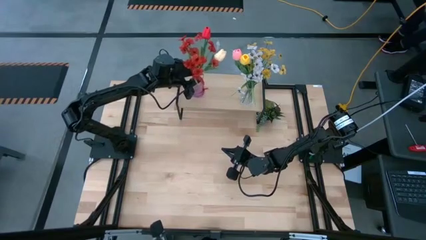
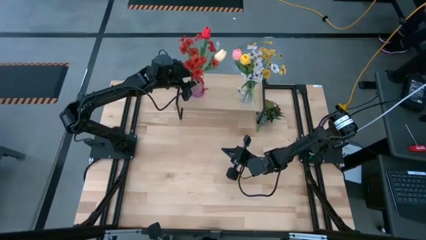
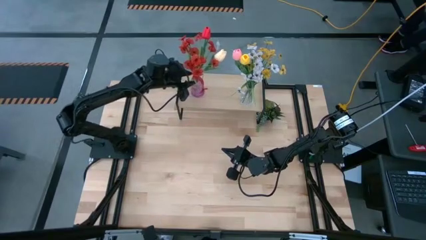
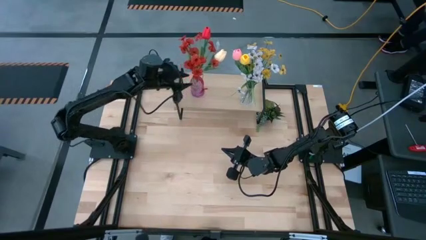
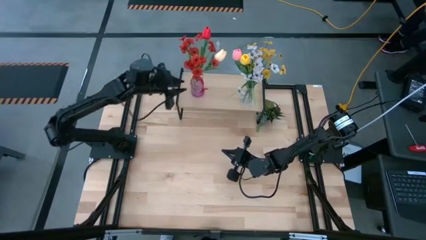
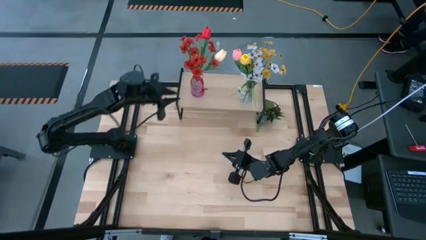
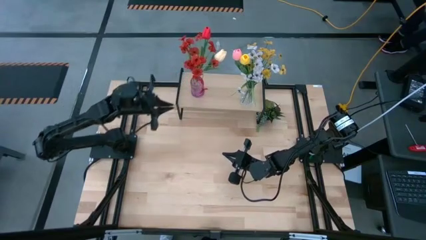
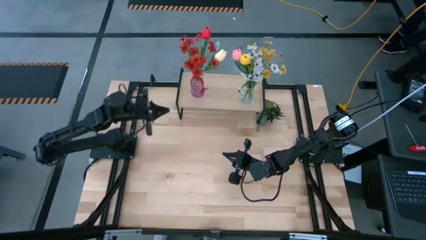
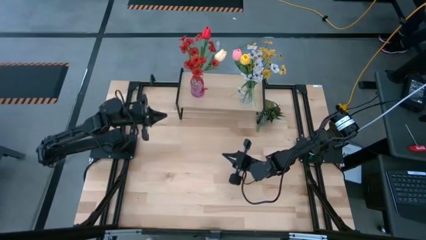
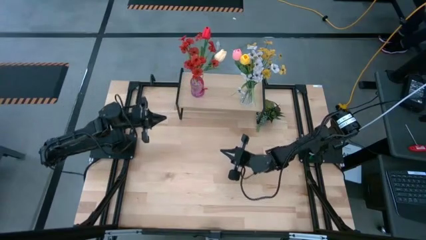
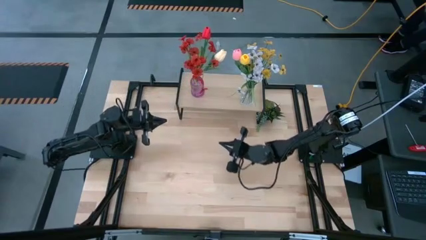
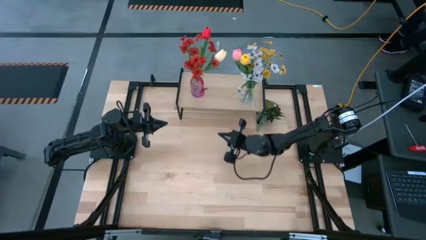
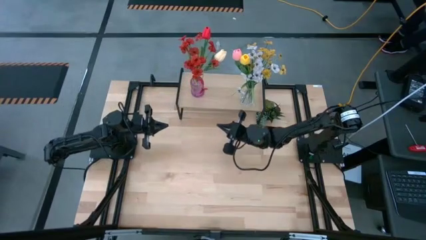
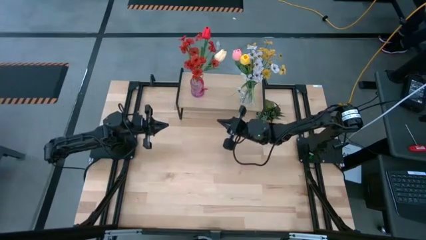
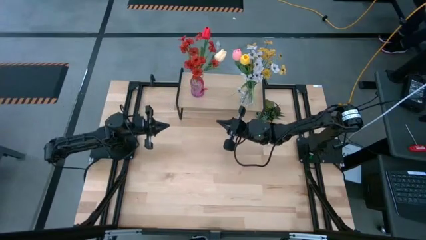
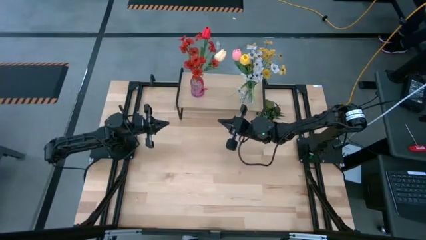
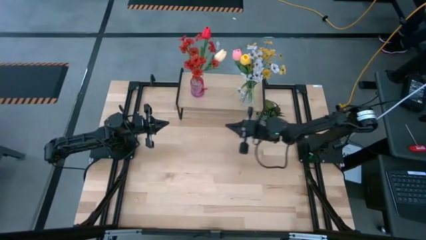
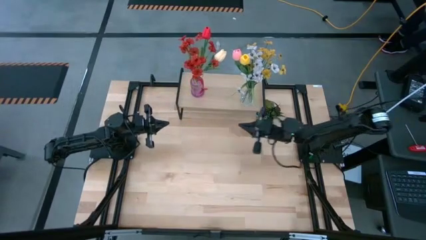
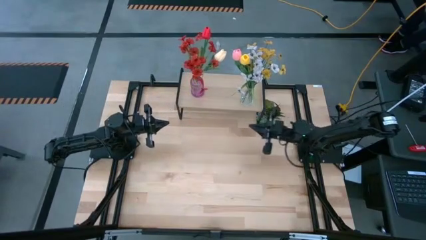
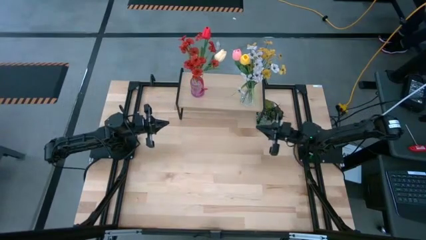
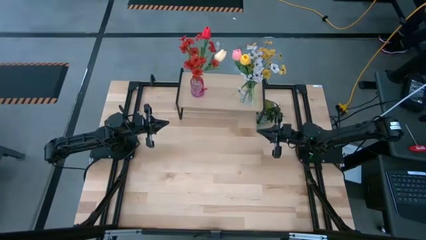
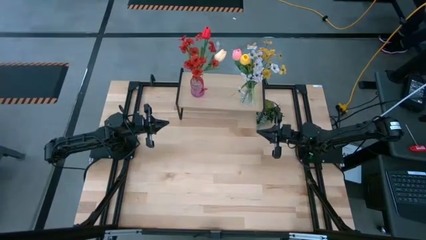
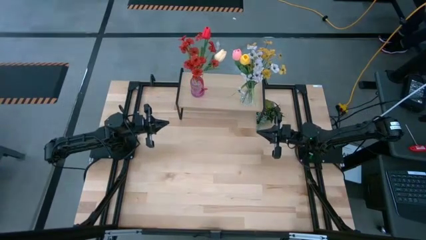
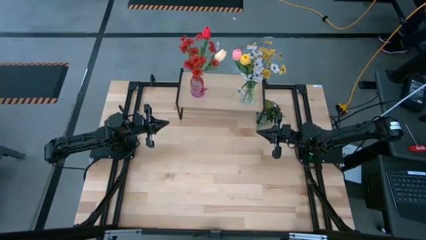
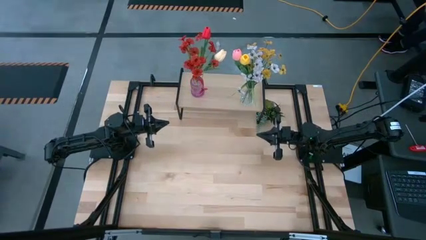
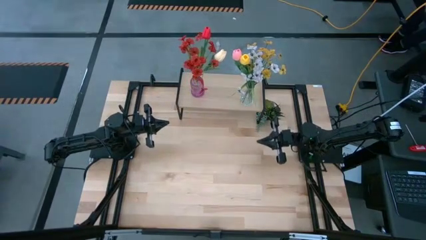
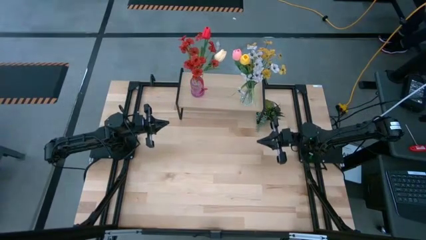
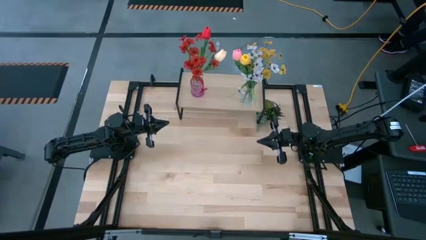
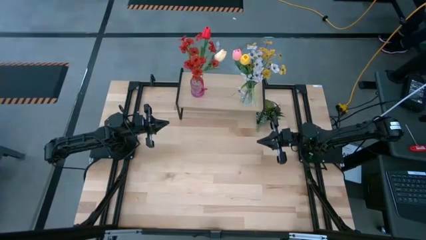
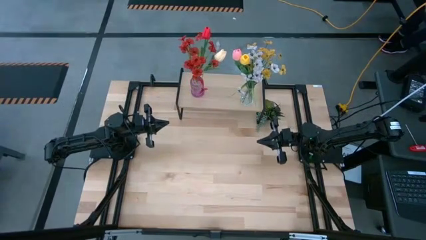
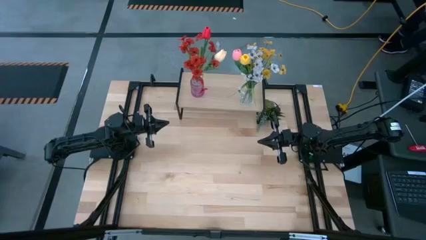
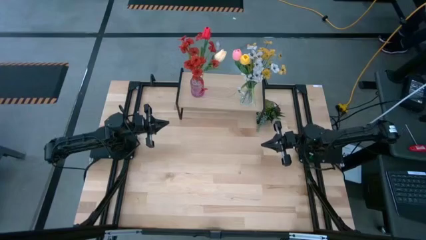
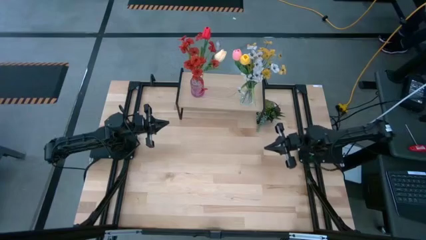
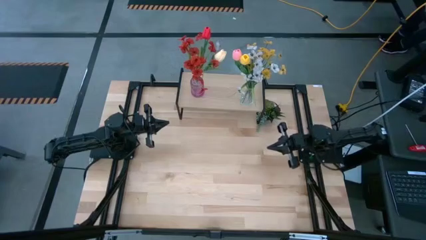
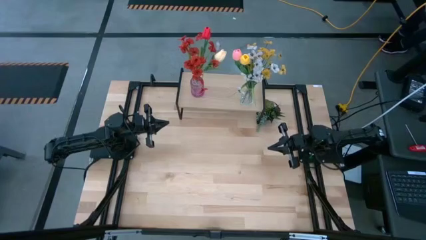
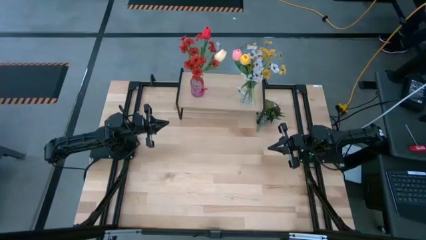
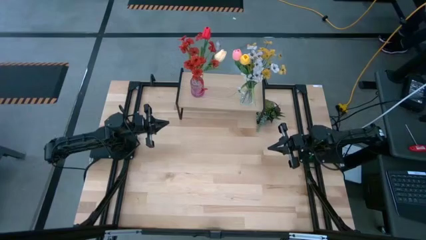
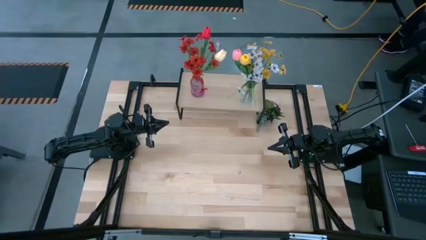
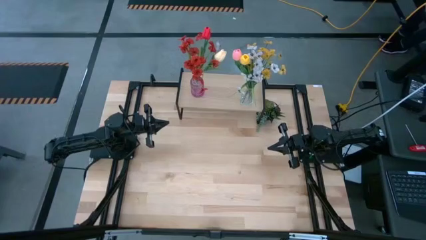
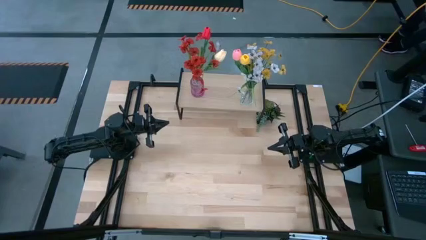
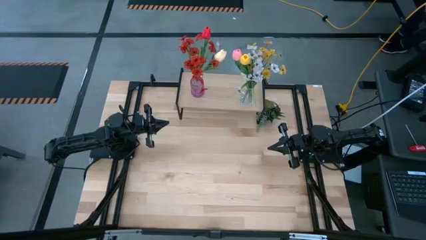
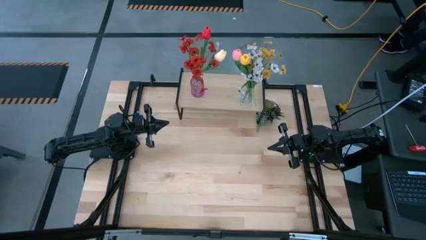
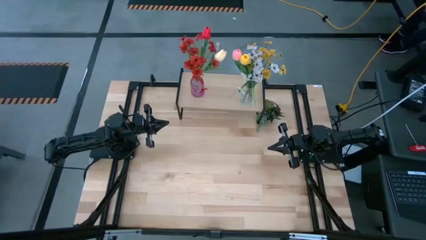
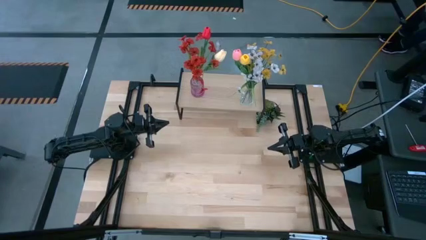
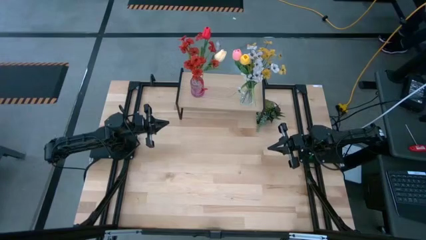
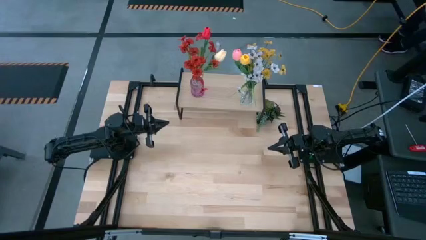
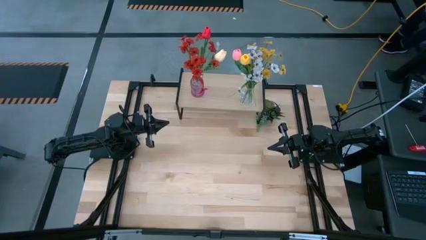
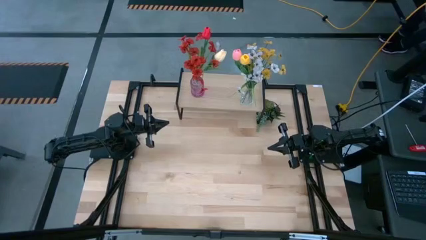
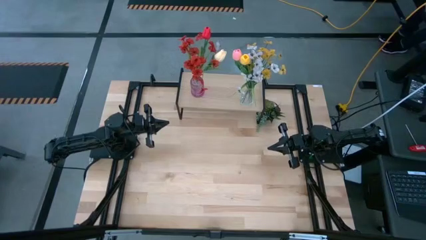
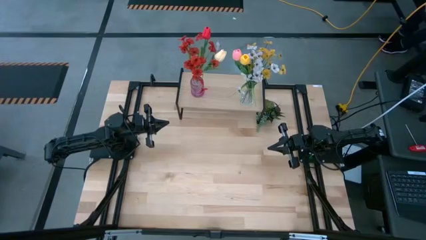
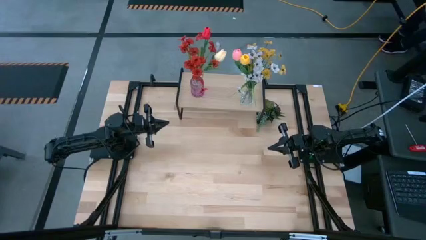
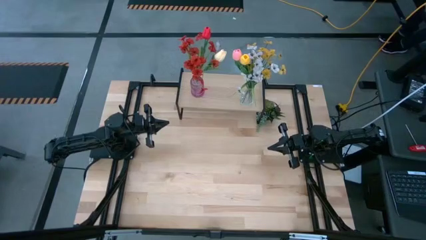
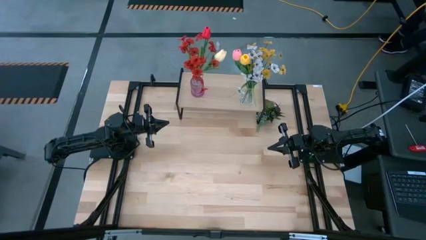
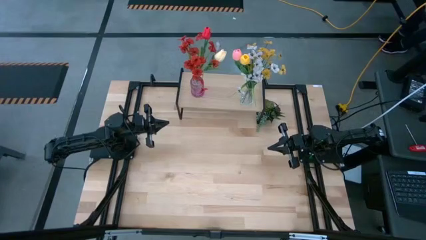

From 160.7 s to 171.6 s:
Task: Pick and place flowers into a vace then onto a shelf
Return to Home Position

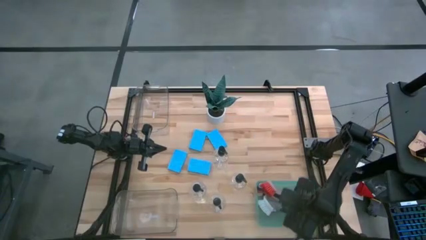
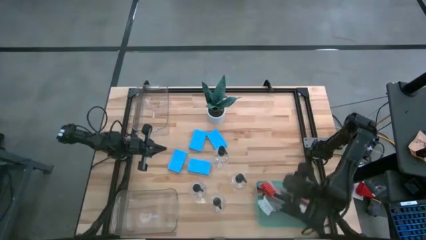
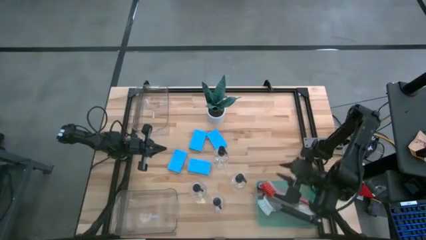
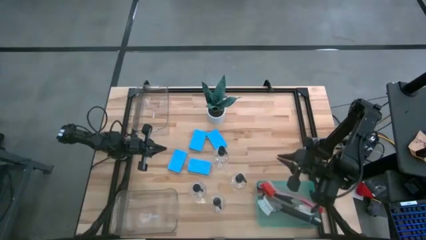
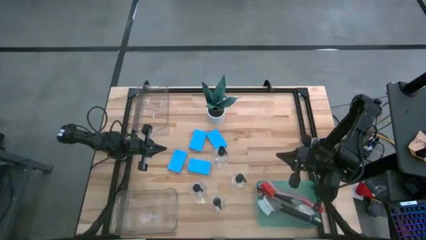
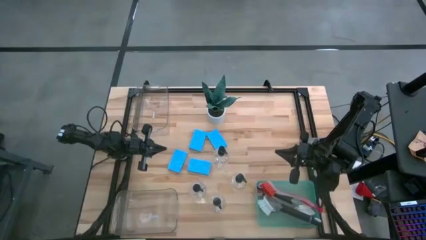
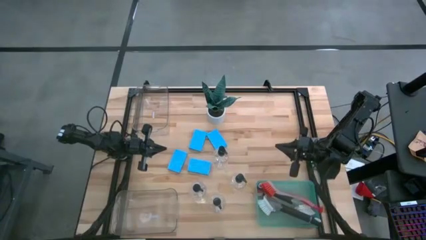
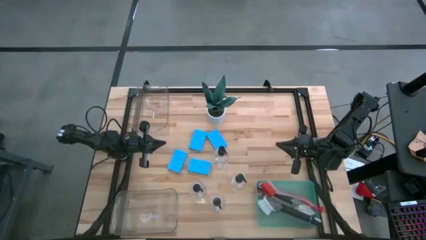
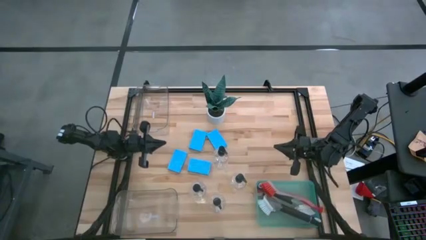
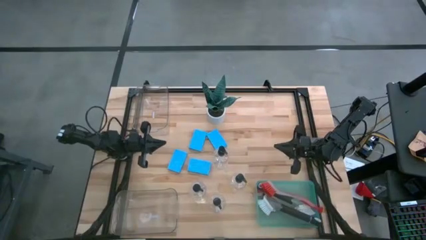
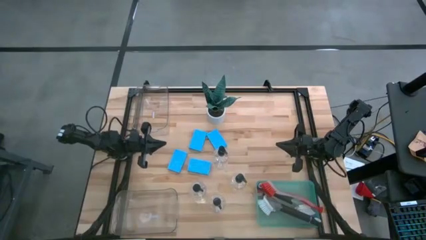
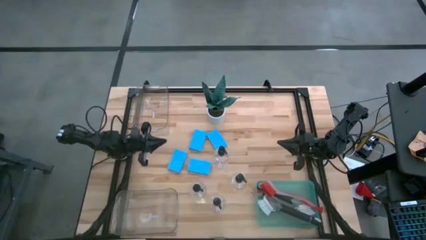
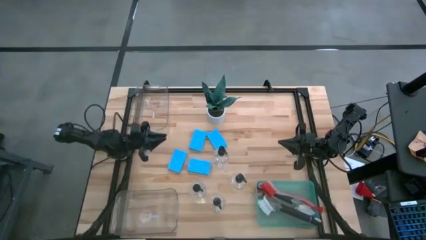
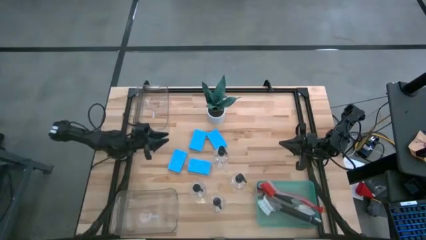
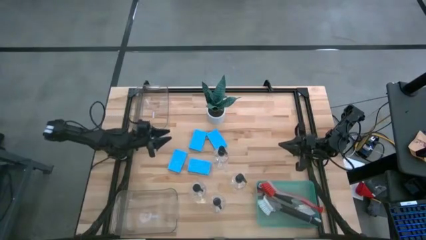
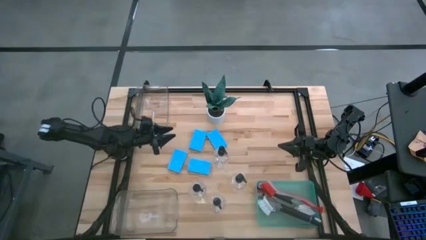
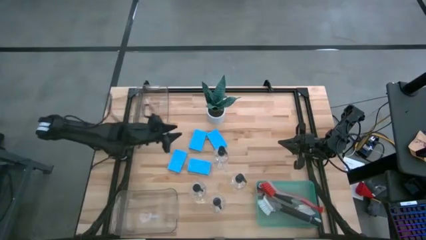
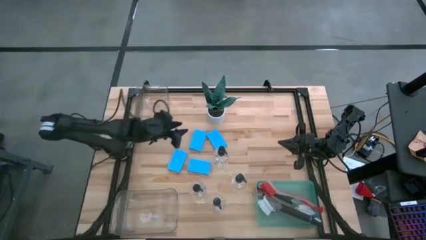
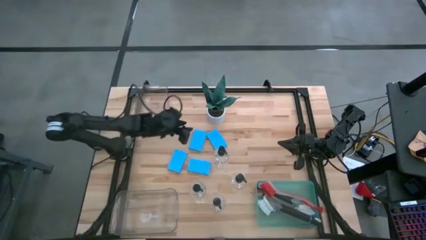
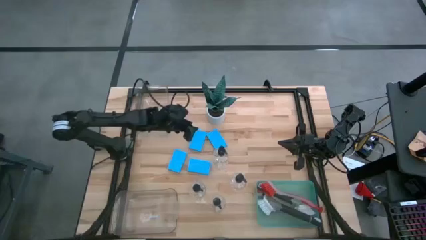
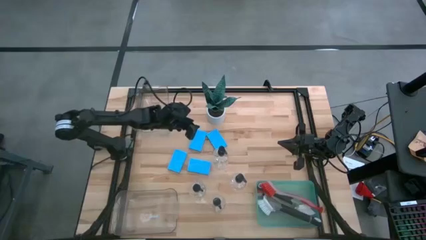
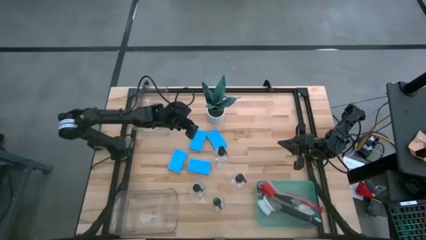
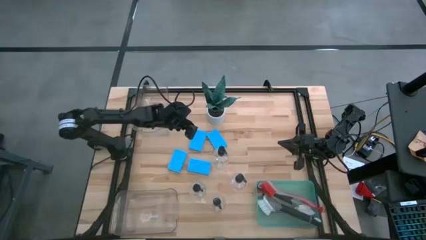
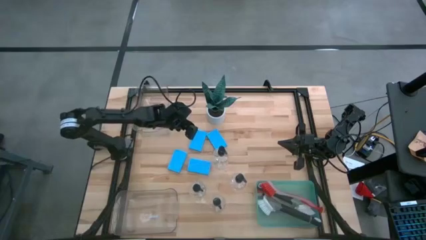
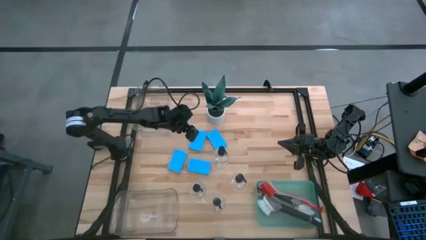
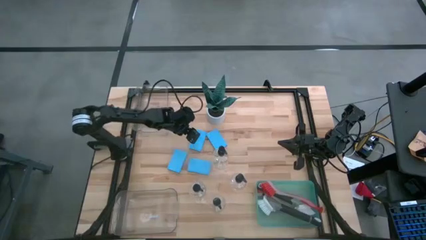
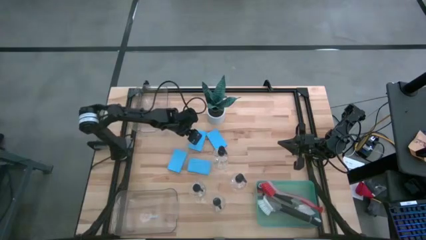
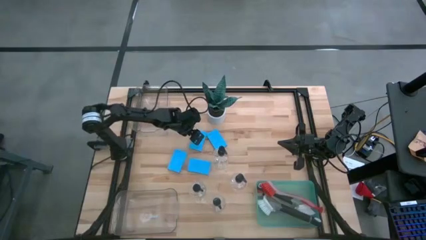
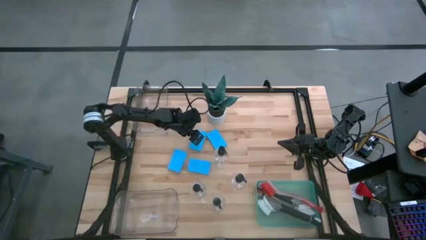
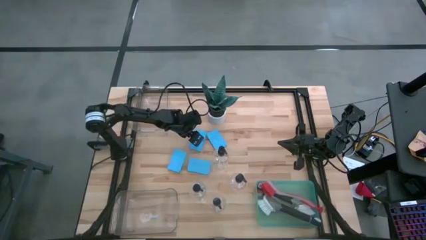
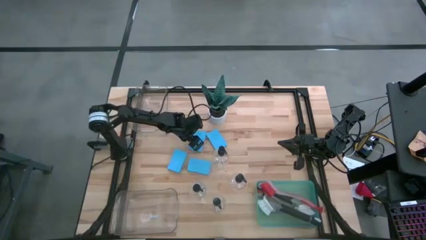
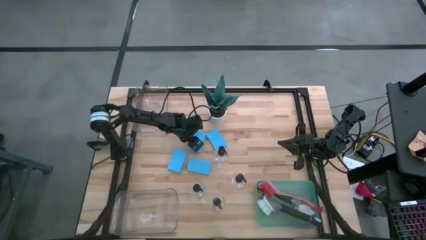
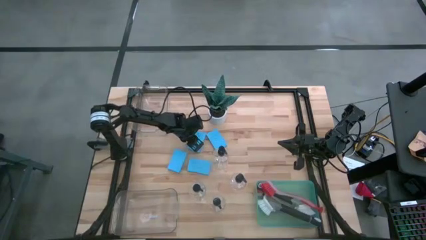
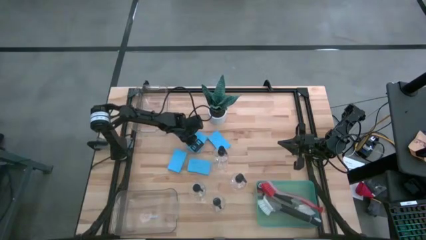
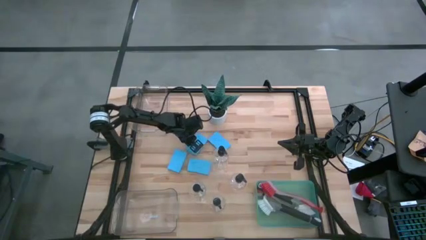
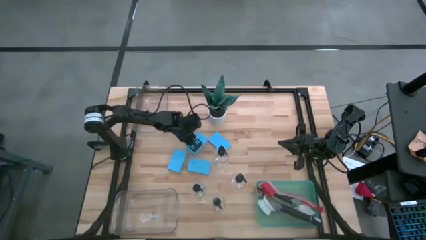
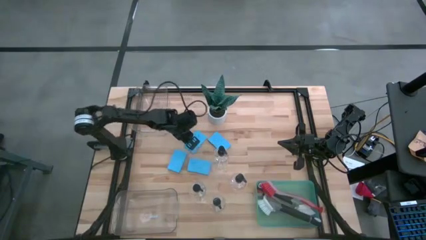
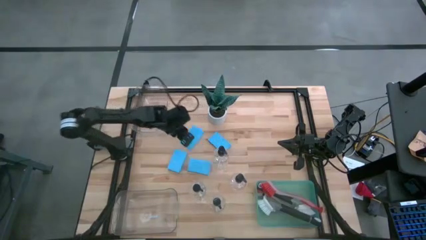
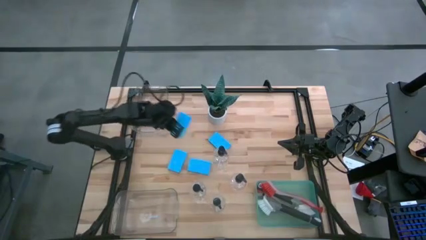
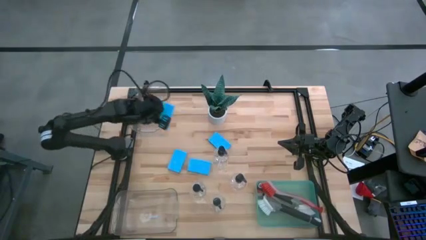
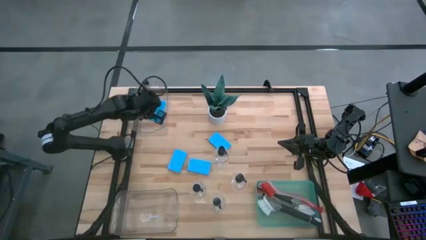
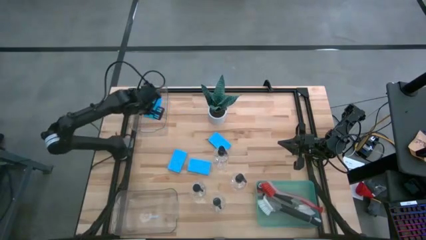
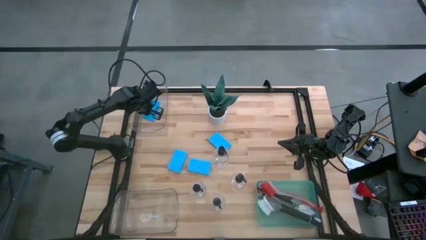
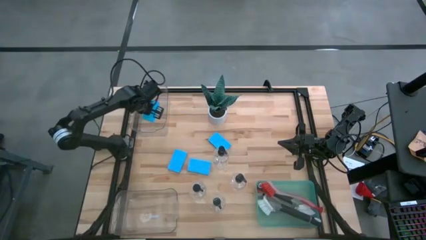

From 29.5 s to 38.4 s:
Task: Pick & Place Kitchen Sink Supplies
Put the blue sponge into the top transparent bin
